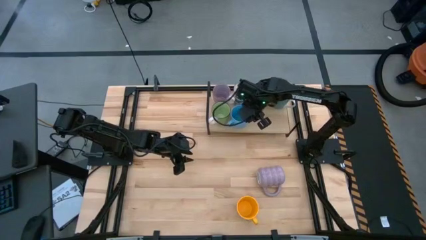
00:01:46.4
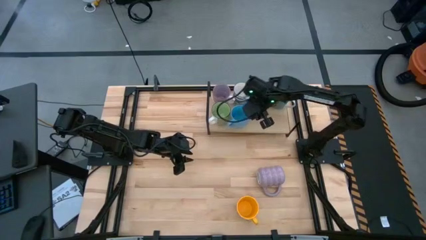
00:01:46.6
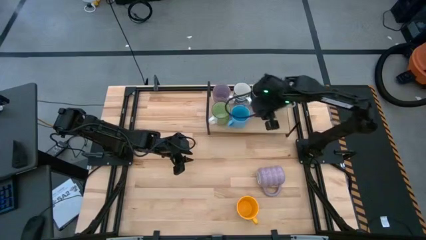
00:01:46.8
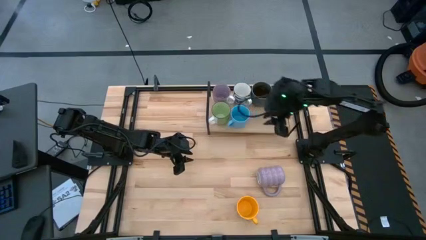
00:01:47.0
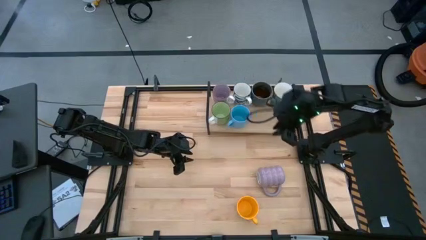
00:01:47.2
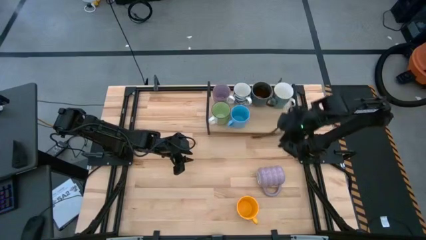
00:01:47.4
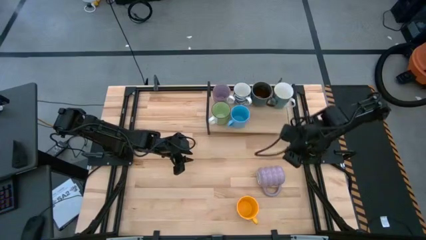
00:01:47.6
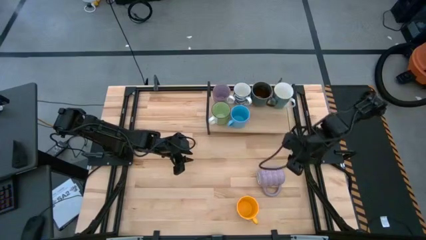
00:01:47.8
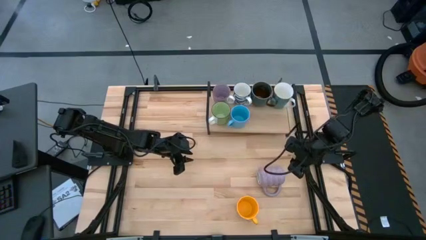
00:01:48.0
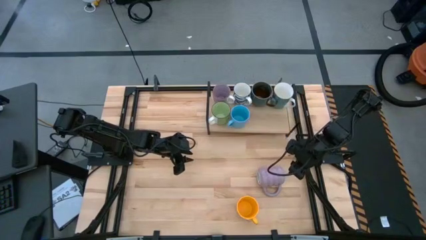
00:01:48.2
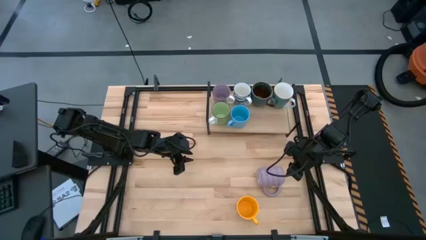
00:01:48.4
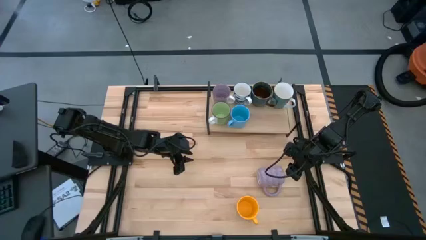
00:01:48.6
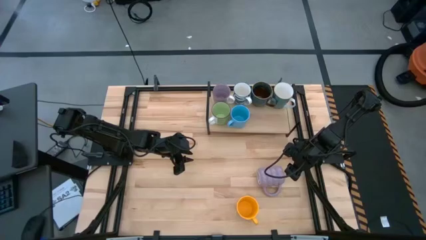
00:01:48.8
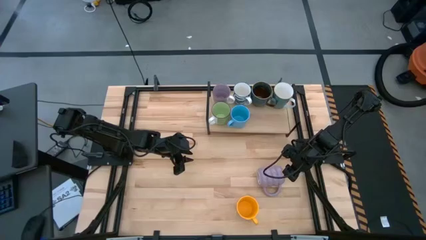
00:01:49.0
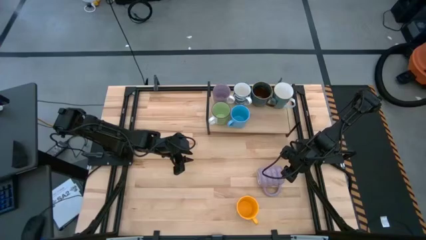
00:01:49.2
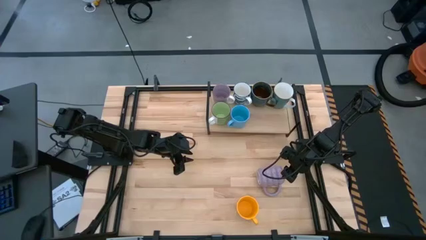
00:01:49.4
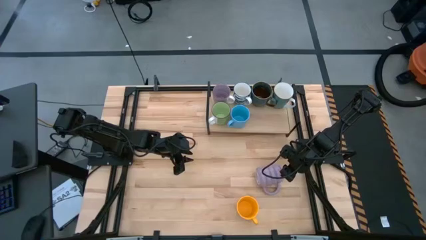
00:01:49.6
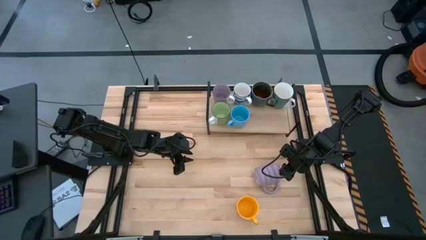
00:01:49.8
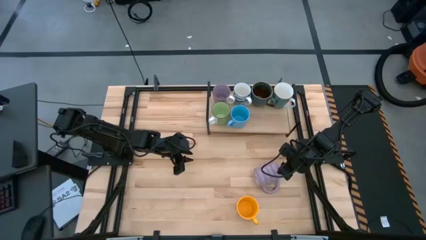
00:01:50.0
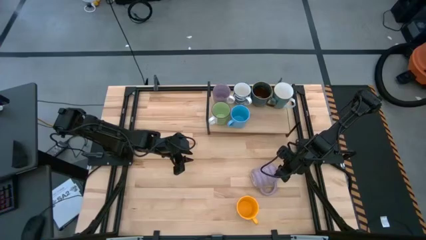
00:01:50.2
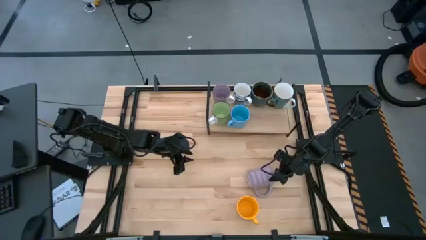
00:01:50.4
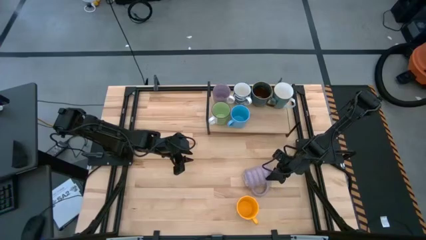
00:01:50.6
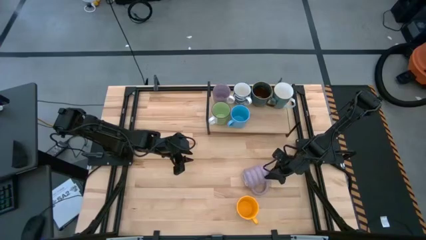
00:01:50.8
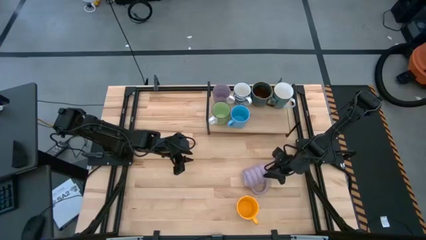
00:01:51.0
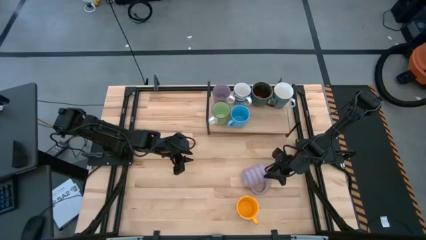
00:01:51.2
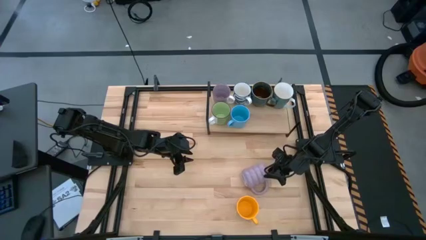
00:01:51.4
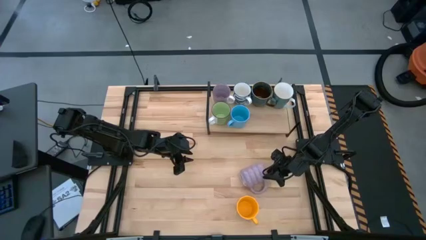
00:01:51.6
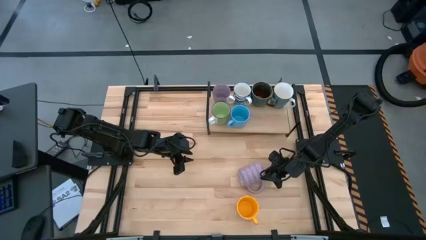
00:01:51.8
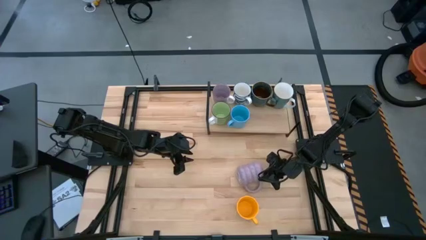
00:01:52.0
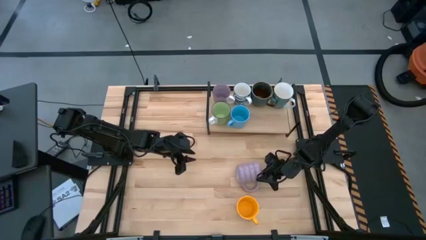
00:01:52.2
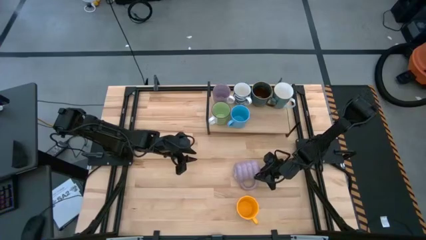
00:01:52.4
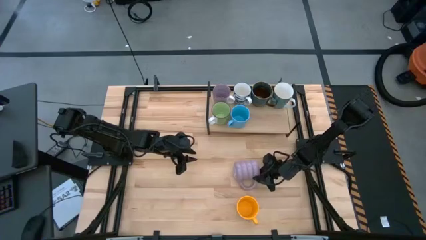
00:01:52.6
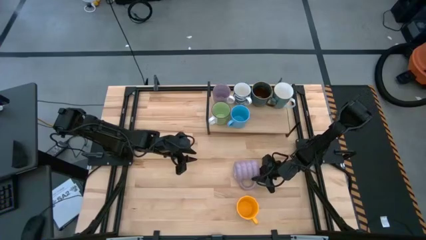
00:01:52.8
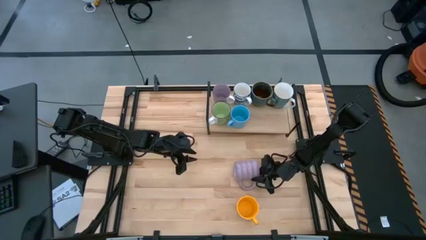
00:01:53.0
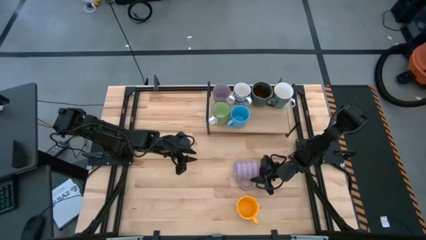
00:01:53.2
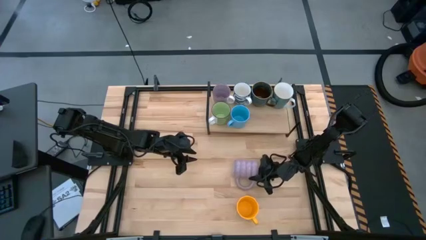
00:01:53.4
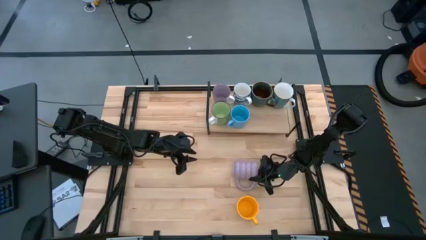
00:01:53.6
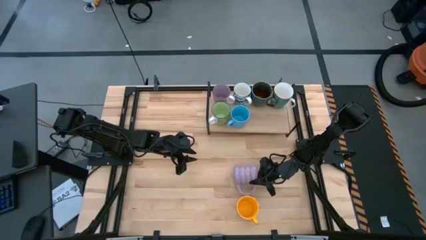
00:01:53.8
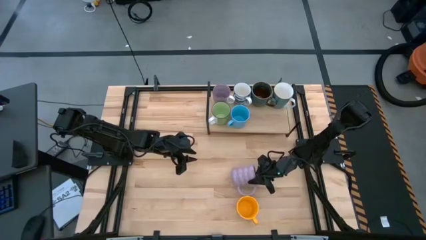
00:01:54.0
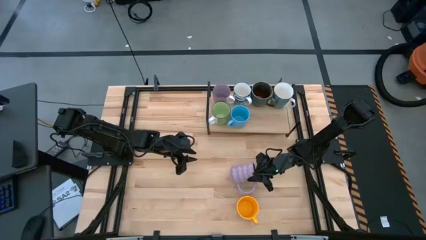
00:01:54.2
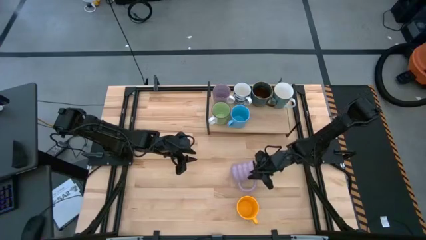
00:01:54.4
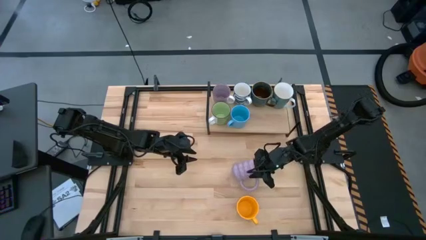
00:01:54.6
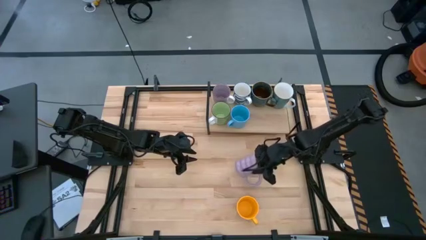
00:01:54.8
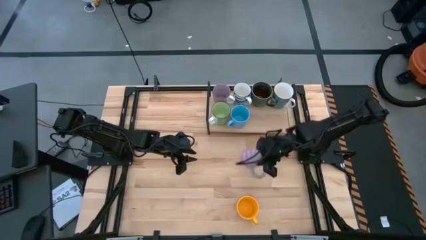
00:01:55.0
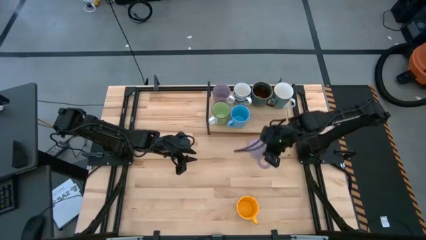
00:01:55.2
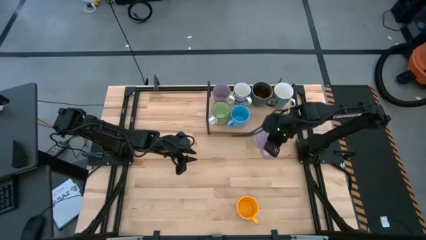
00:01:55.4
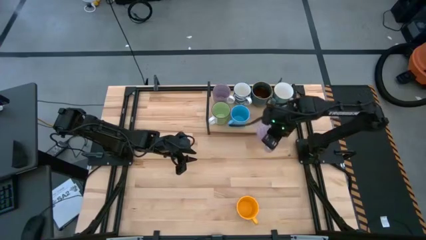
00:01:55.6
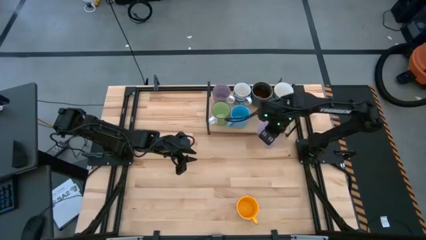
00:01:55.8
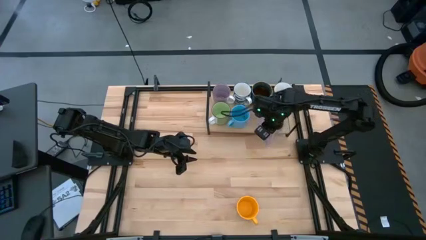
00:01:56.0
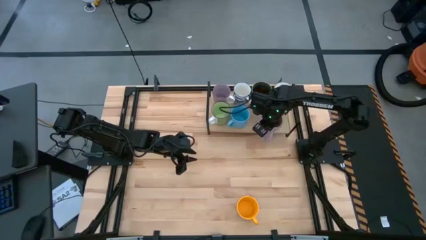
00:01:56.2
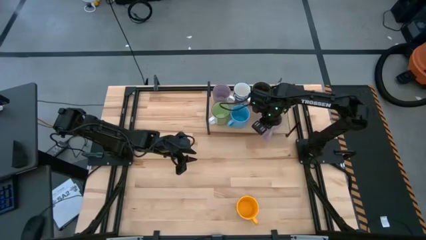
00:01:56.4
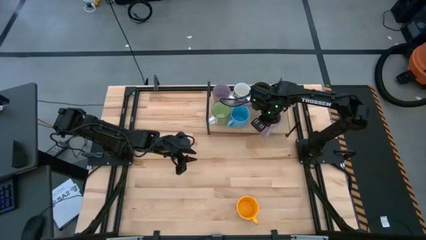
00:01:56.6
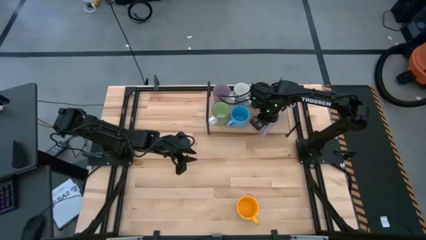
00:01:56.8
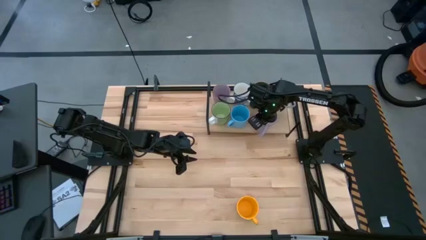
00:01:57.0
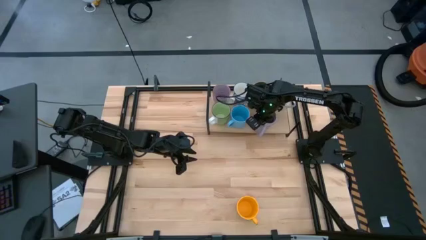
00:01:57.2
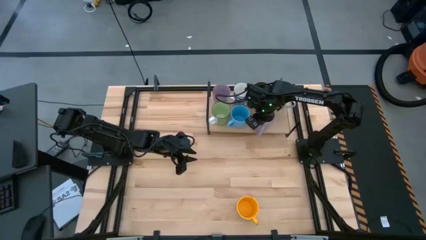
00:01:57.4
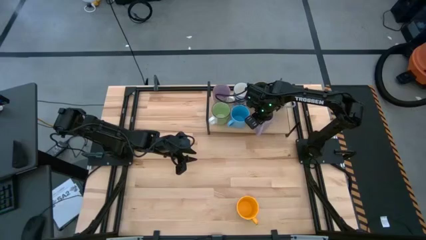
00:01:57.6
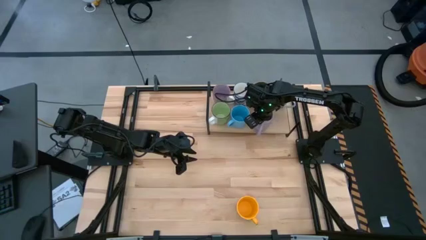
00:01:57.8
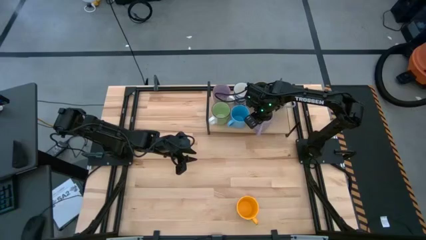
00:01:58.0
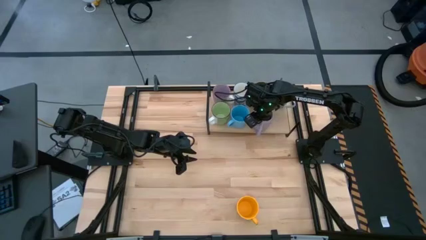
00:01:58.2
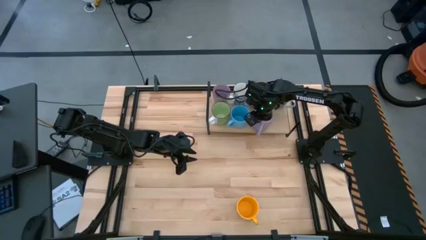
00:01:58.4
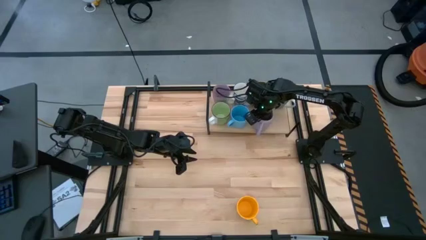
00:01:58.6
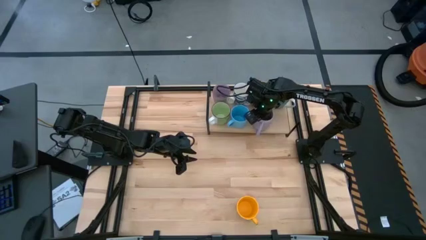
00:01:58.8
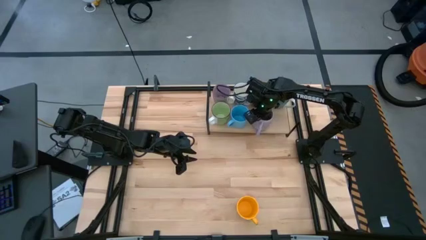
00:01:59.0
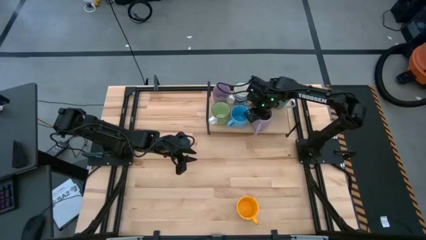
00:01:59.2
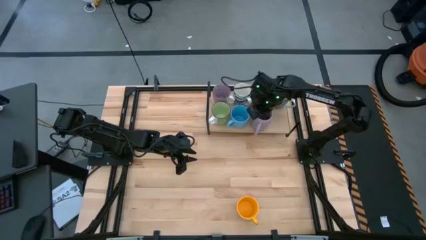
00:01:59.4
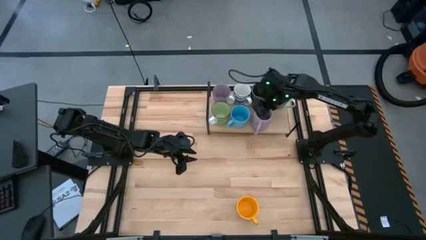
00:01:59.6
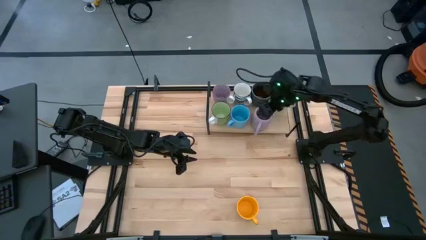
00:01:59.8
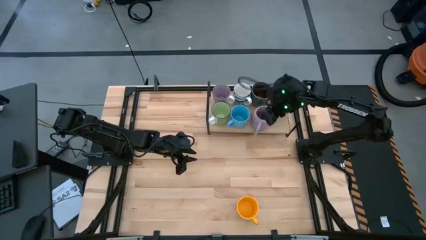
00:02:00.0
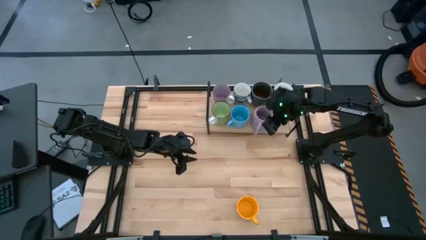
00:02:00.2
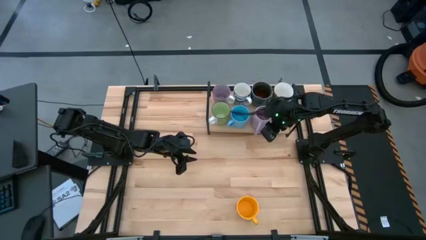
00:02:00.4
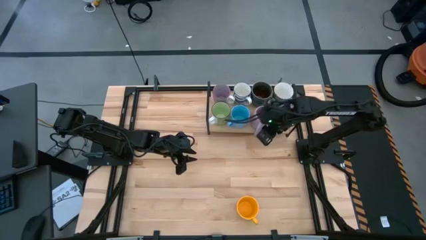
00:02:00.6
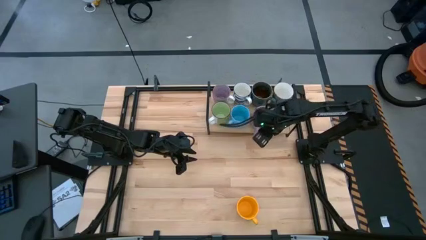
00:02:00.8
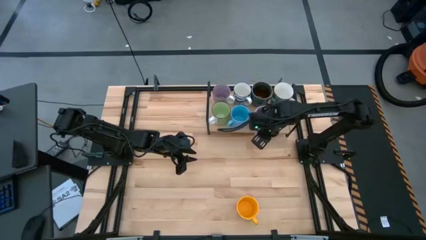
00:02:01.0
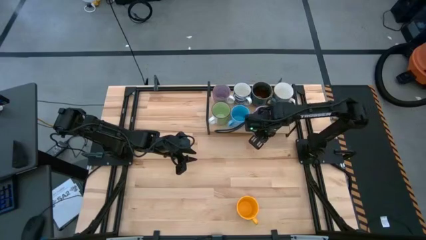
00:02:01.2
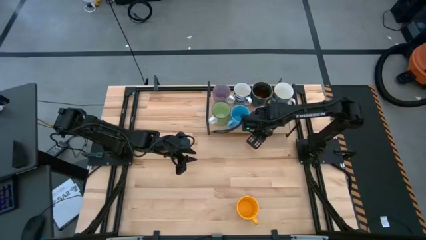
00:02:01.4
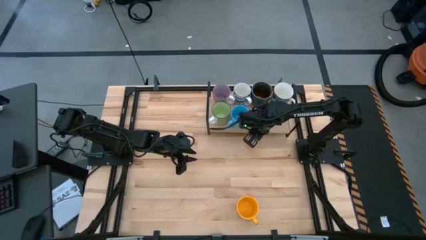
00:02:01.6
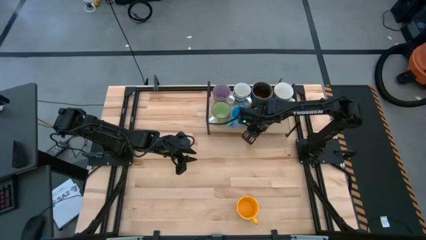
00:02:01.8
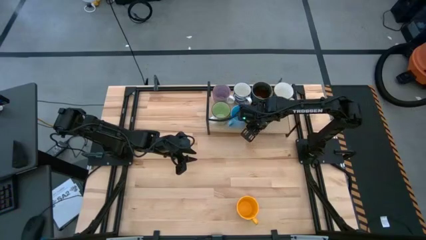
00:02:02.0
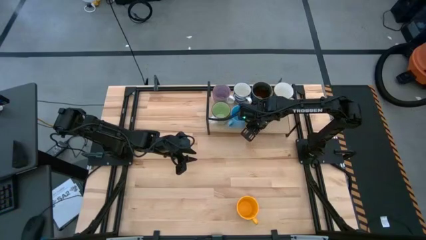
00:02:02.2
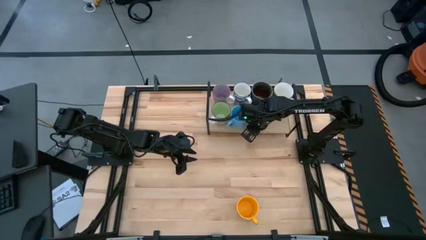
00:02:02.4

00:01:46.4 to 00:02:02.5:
Task: Place coffee mugs
Put the light purple mug on the shelf

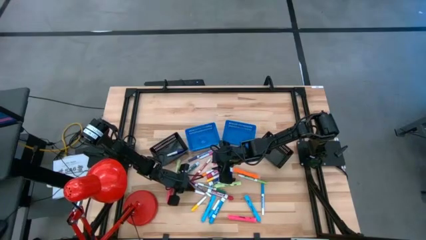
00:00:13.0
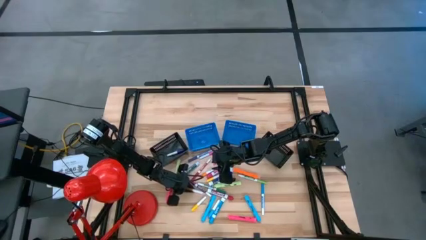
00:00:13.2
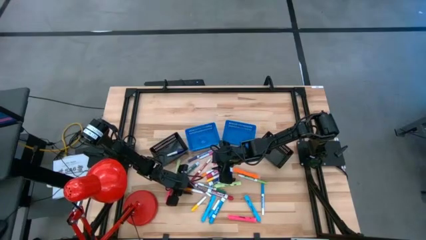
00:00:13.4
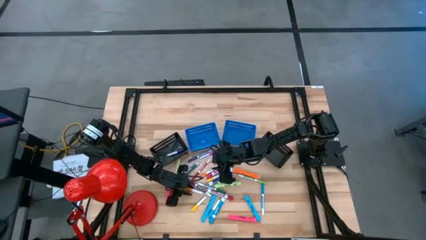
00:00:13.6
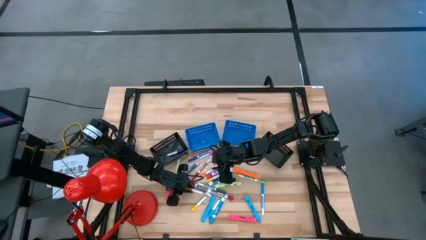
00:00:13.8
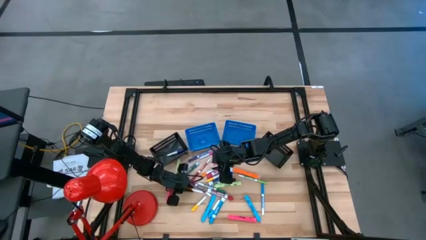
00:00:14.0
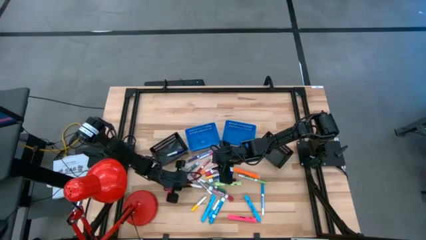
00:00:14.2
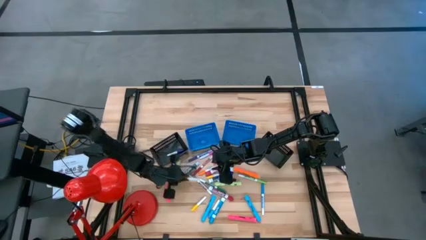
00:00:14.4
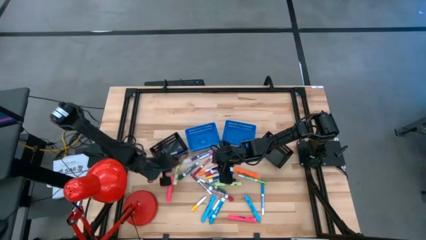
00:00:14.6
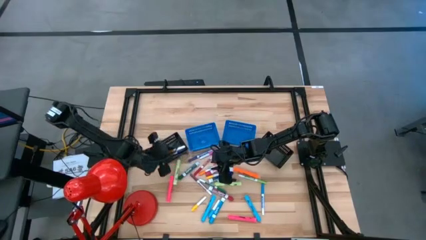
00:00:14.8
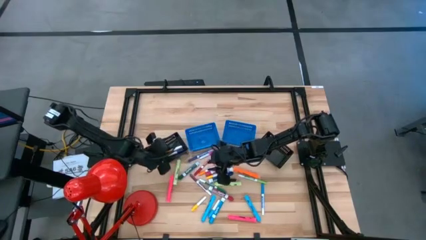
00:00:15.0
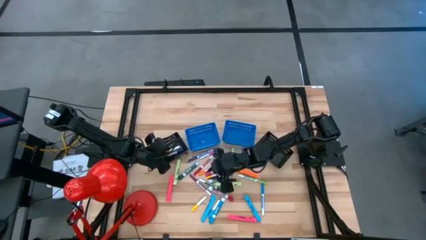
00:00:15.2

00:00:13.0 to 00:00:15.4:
Task: Pick & Place Markers
Put the orange water marker into the left black bin
